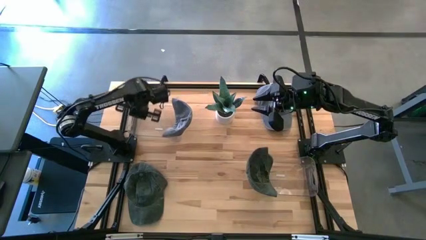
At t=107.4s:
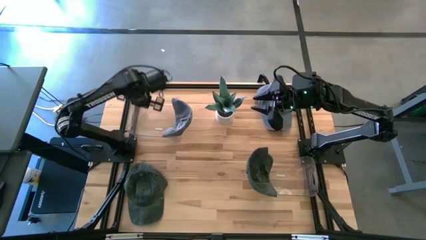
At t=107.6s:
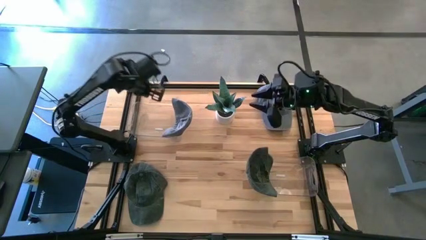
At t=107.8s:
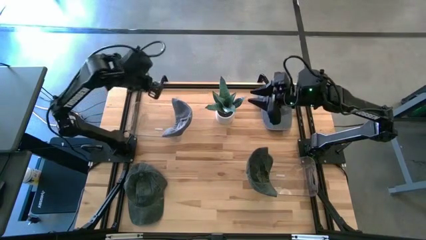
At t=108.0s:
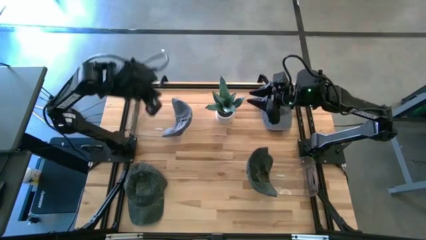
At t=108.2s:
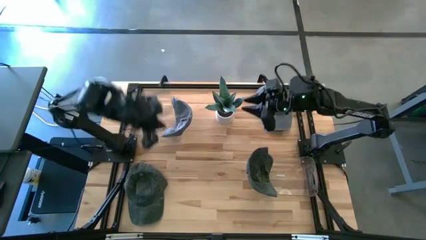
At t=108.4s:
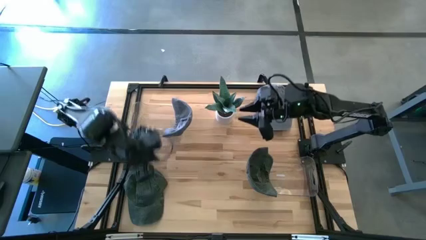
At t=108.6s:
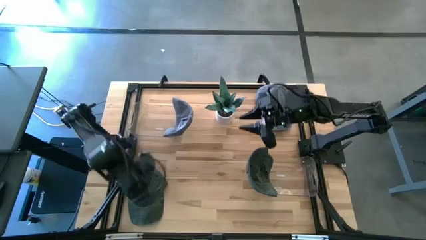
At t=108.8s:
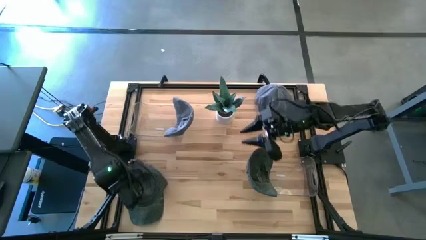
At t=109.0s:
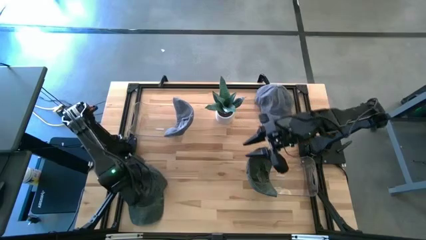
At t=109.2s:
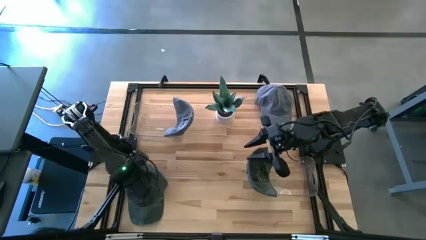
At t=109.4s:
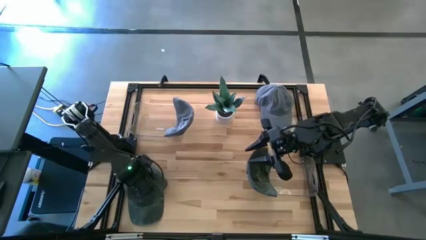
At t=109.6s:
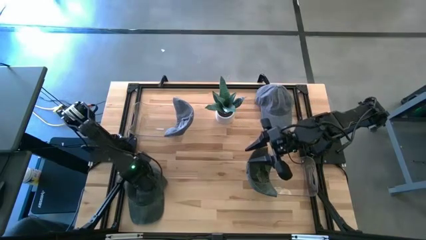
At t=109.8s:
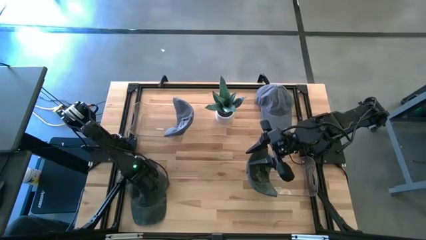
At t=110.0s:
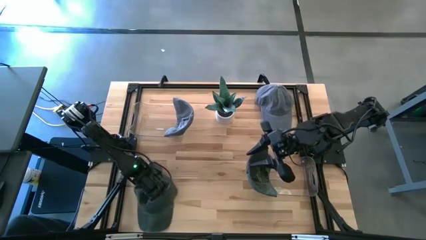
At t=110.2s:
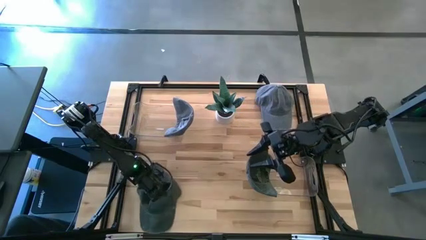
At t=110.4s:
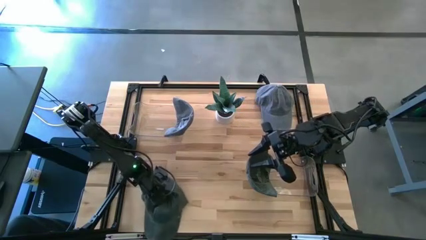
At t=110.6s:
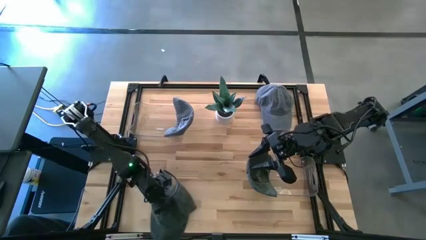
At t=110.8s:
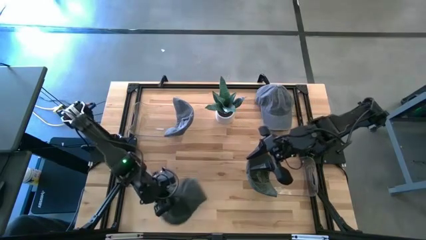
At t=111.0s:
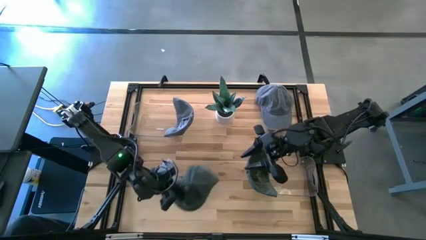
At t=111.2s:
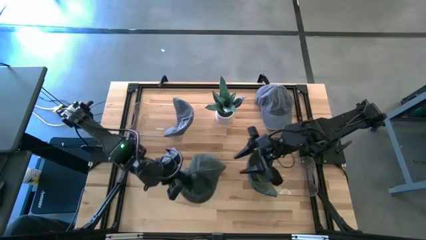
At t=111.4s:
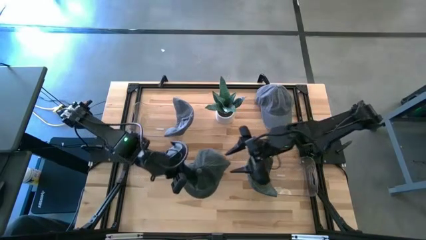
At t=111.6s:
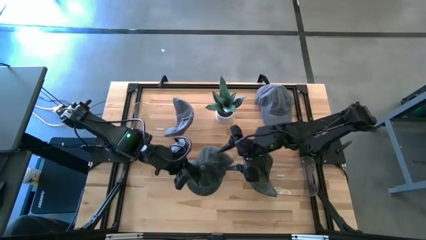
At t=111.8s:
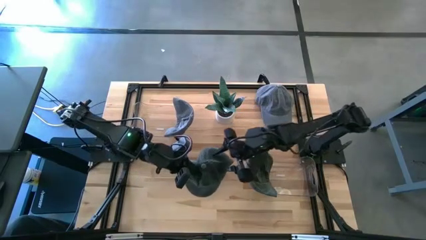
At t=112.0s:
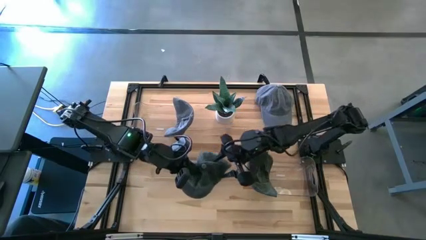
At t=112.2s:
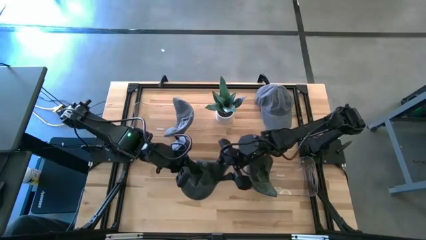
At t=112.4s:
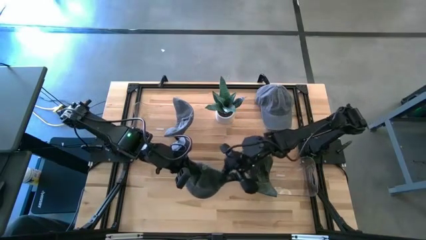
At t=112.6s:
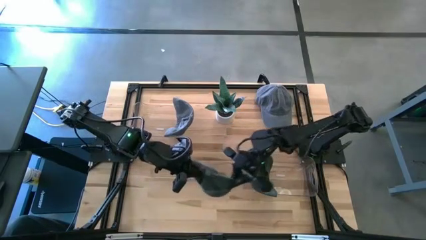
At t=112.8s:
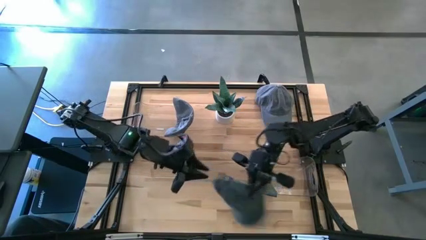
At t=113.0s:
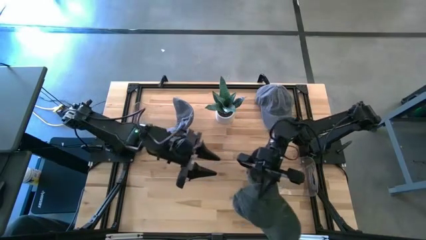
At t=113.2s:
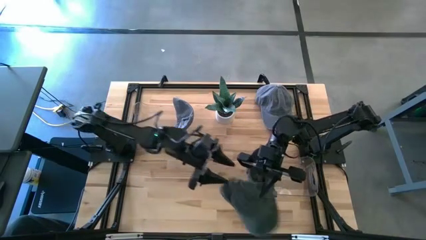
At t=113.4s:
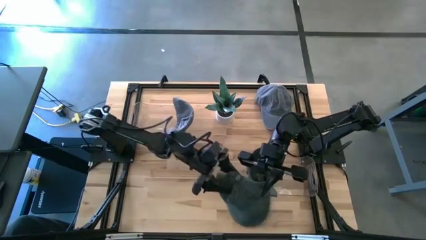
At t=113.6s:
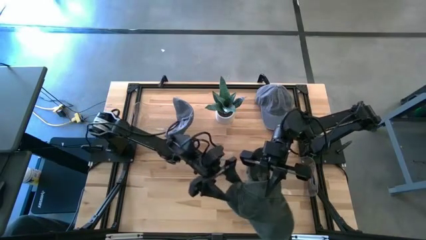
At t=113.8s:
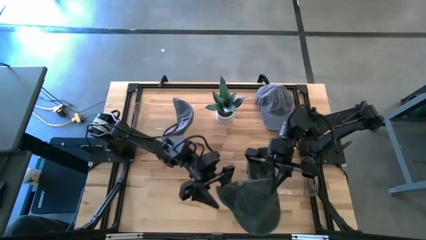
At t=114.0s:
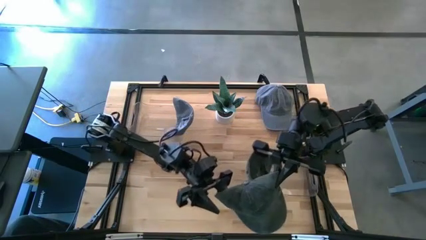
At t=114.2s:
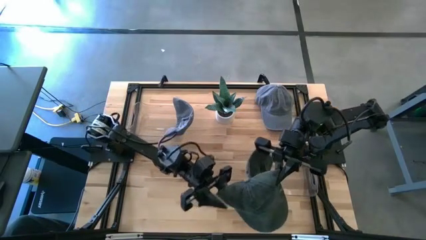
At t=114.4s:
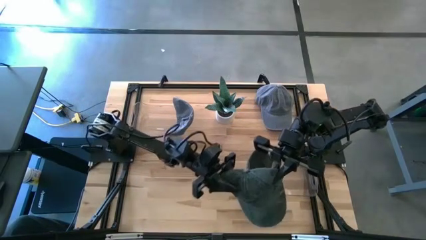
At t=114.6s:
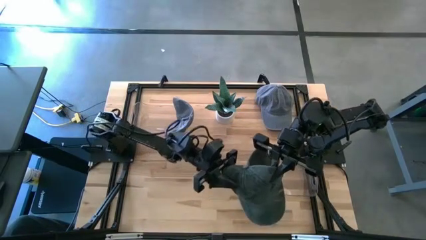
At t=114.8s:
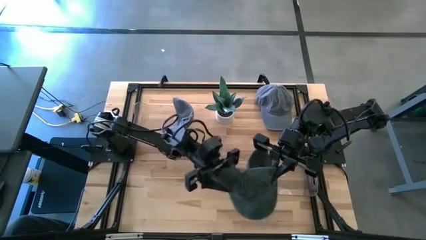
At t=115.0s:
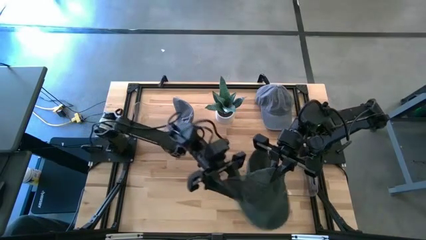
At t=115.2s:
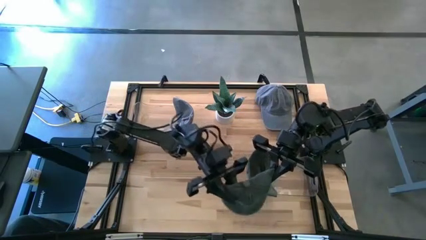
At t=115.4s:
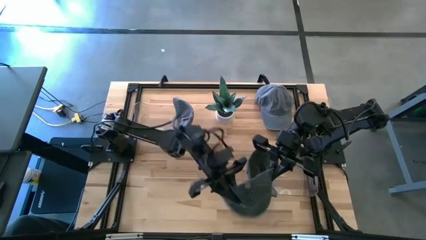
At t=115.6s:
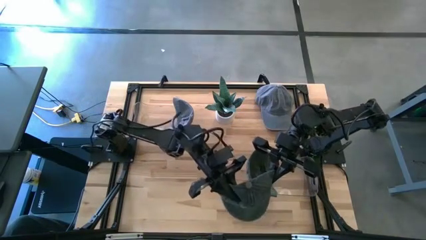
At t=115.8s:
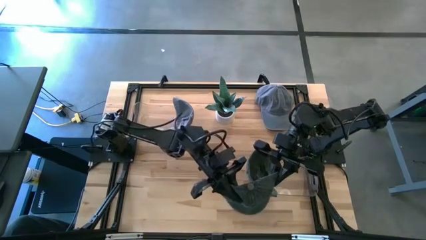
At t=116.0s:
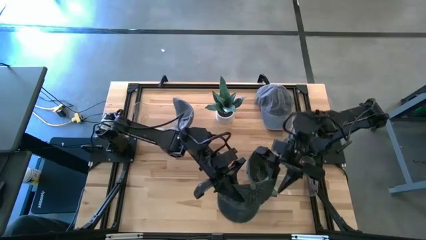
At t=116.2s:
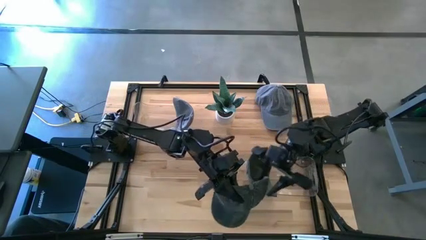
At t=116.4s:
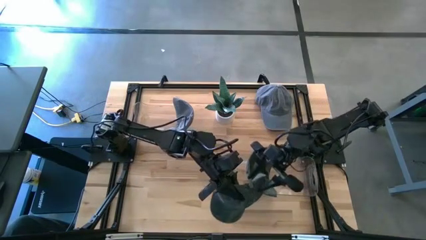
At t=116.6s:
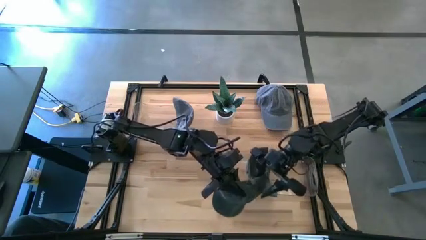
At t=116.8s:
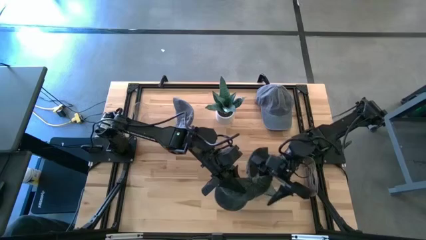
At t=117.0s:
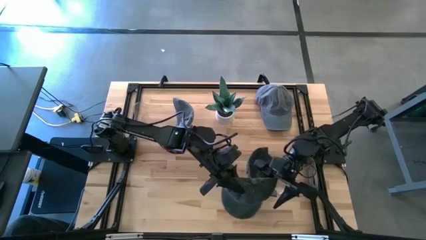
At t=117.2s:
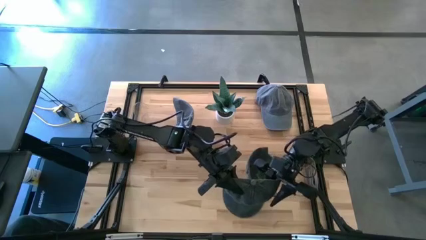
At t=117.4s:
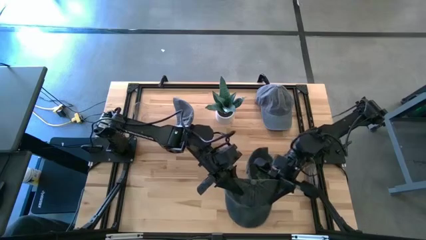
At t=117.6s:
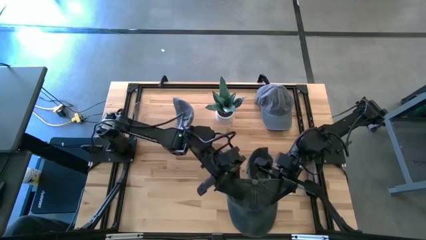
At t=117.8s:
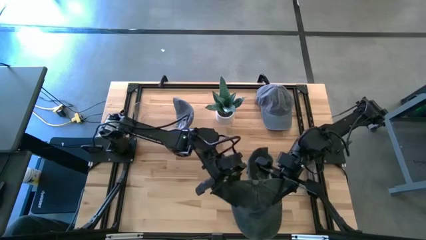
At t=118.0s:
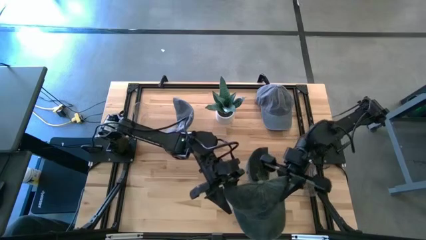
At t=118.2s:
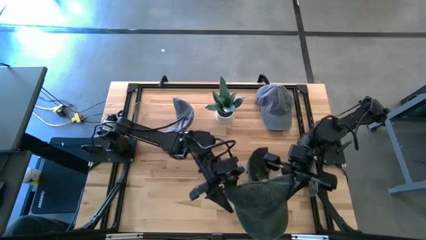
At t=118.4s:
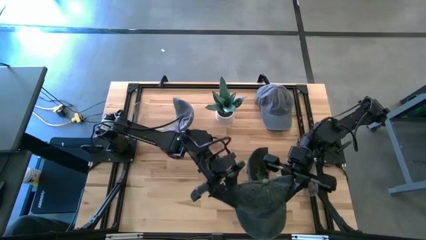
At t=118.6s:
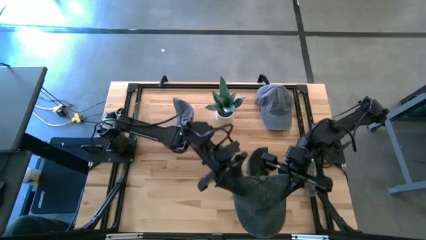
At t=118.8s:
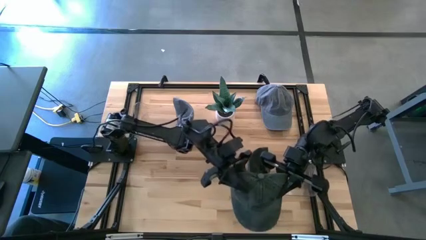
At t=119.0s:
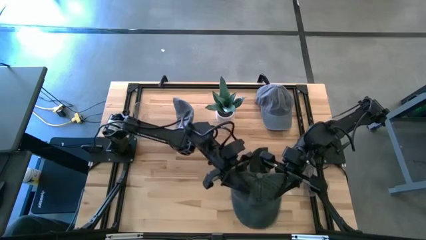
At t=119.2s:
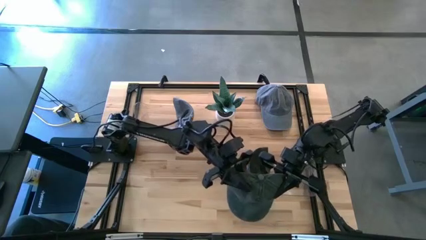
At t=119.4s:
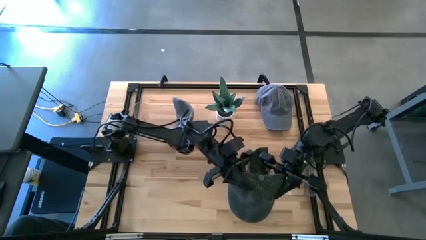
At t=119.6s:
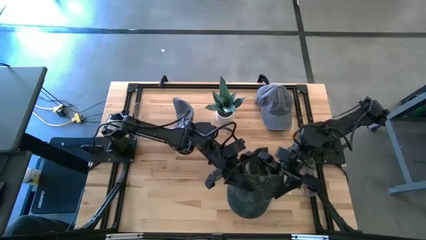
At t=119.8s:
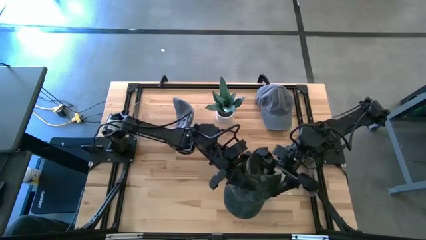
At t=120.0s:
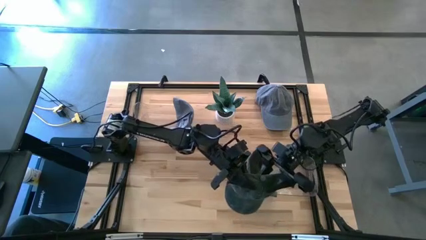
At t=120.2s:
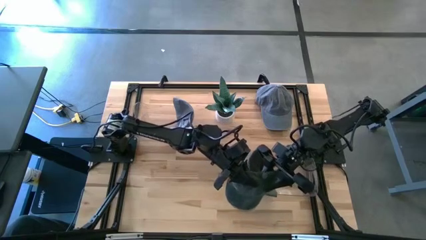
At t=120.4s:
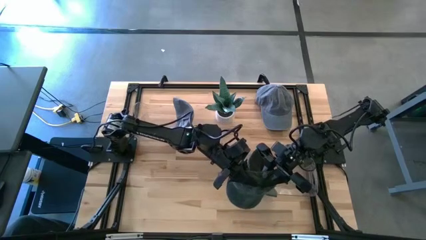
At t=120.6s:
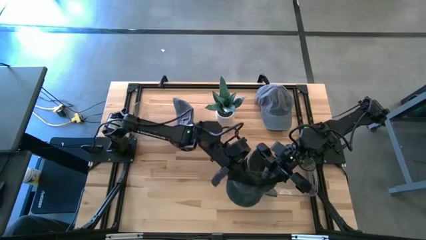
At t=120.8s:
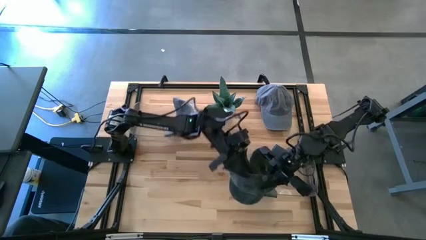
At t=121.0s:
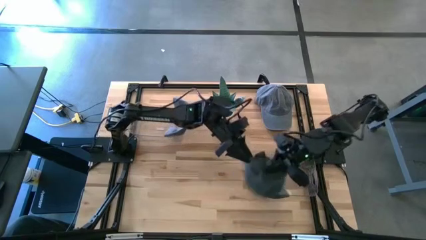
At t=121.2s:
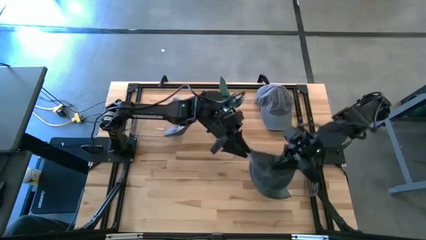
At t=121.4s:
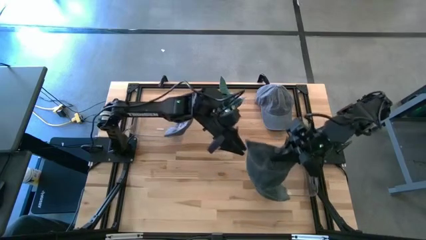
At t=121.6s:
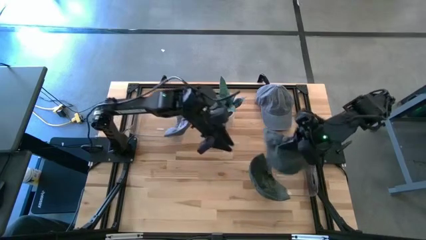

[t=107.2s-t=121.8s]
Task: Pick & Place hat
Put the black cap into the right transparent bin

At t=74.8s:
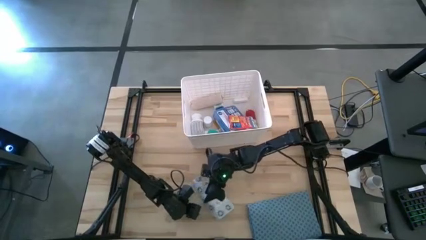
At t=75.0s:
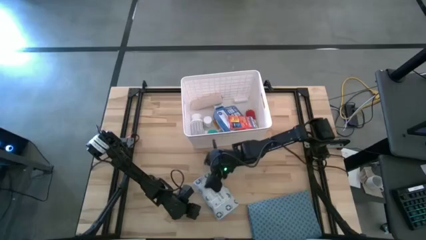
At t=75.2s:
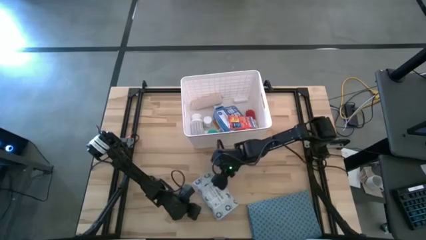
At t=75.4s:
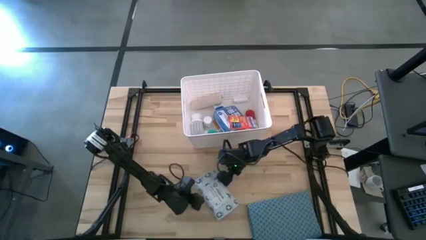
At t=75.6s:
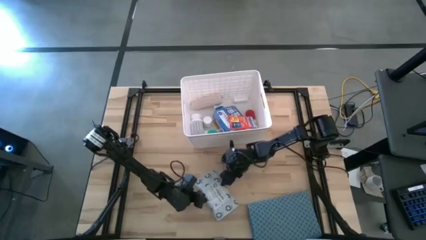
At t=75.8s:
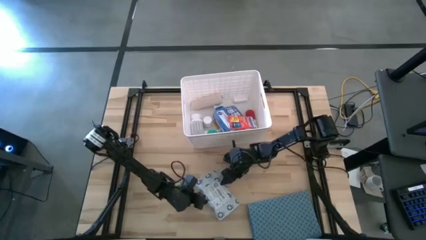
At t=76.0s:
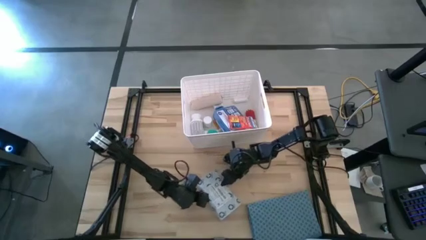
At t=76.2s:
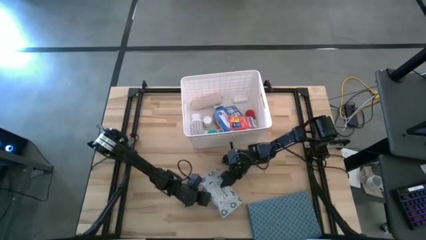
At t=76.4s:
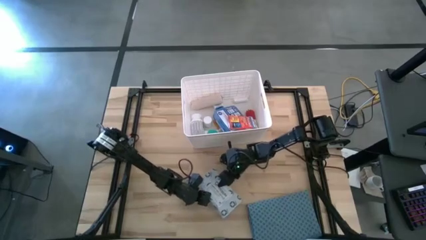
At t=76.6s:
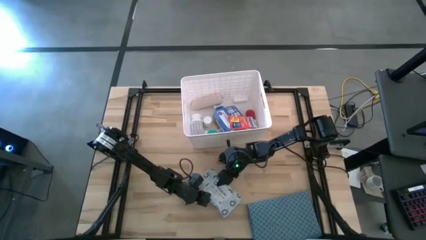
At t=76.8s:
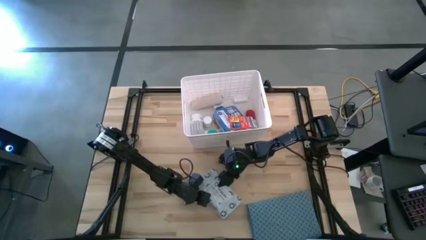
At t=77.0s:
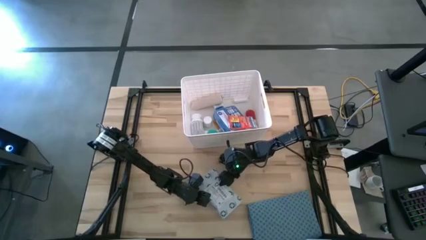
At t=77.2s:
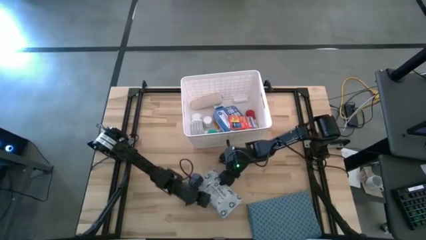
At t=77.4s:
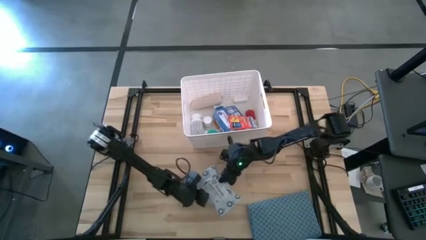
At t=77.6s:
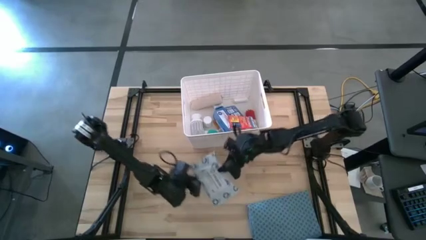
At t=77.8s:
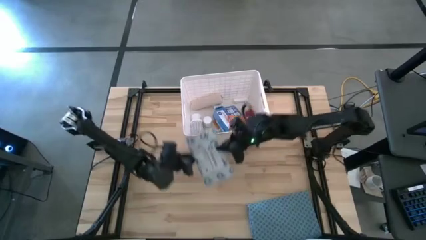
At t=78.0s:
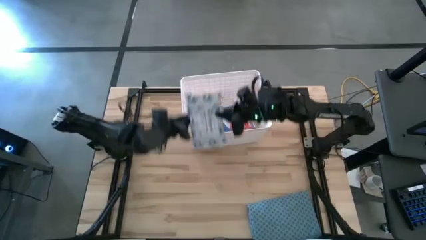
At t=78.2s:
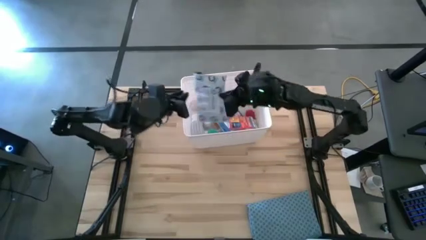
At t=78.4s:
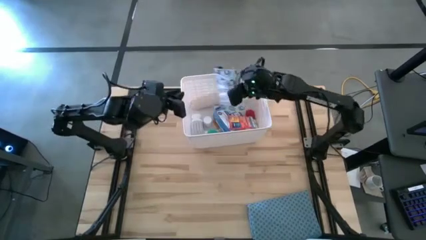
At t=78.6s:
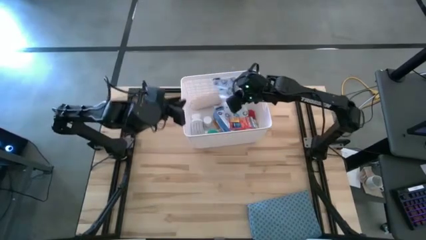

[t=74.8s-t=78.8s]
Task: Pick & place medical supplies in basket/bin
Put the white mailer bag into the white bin
